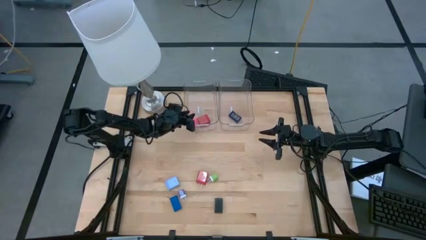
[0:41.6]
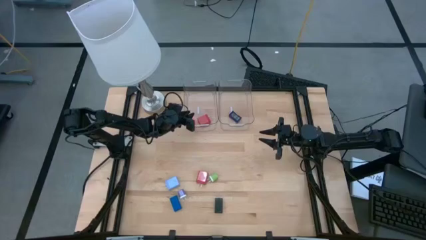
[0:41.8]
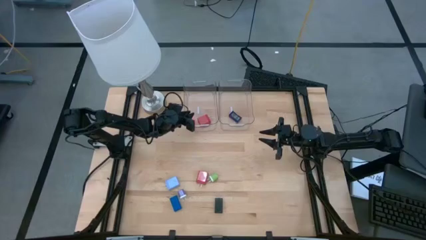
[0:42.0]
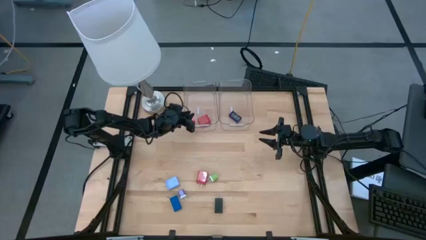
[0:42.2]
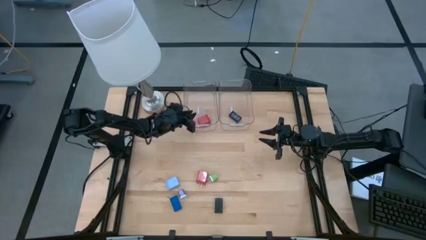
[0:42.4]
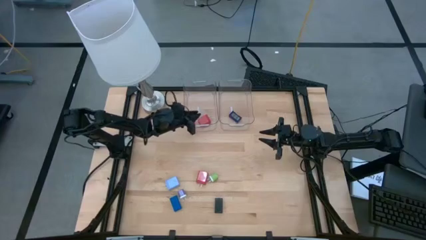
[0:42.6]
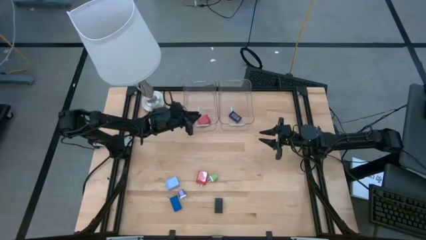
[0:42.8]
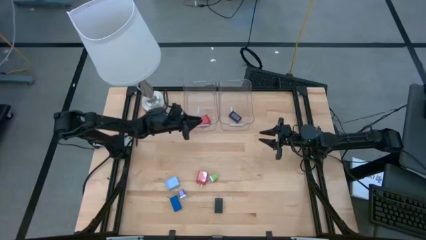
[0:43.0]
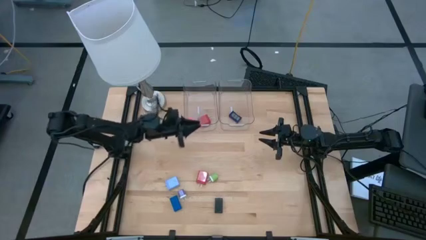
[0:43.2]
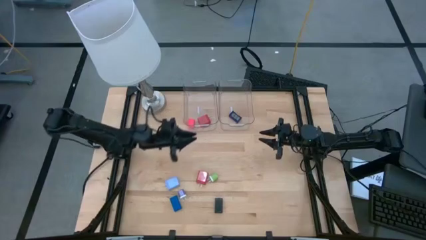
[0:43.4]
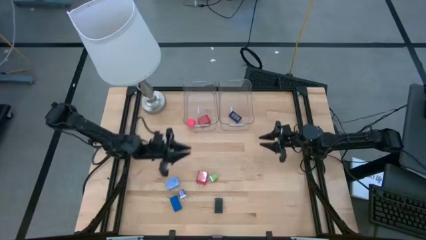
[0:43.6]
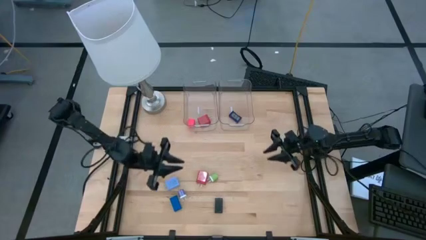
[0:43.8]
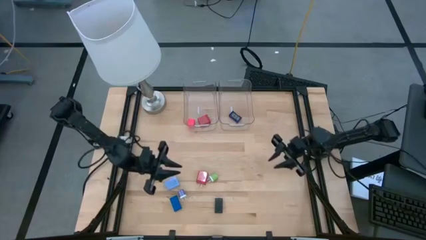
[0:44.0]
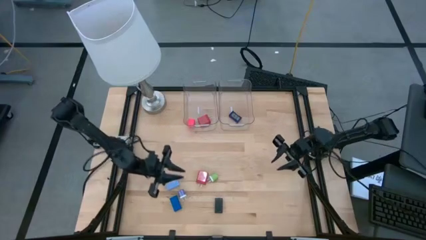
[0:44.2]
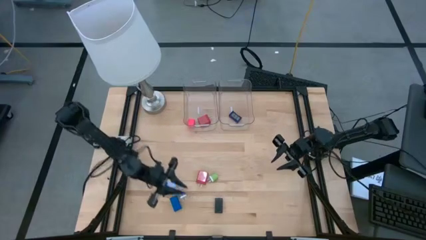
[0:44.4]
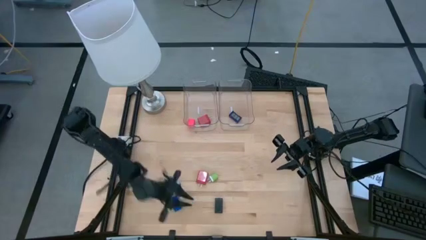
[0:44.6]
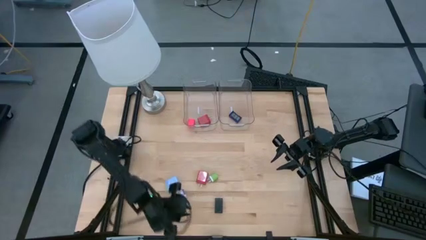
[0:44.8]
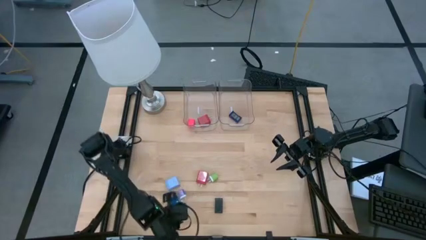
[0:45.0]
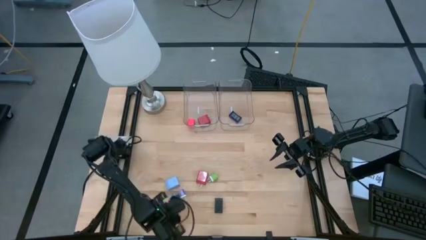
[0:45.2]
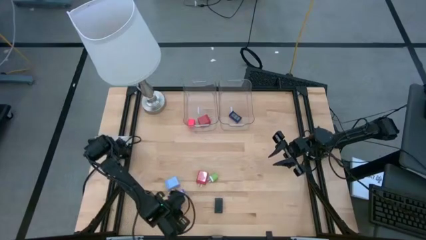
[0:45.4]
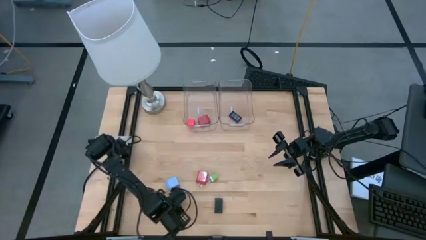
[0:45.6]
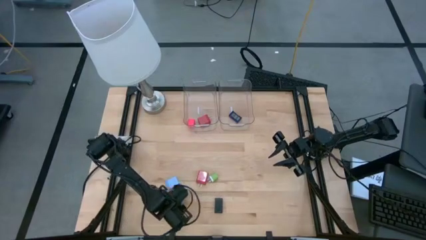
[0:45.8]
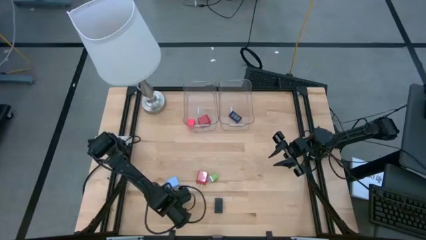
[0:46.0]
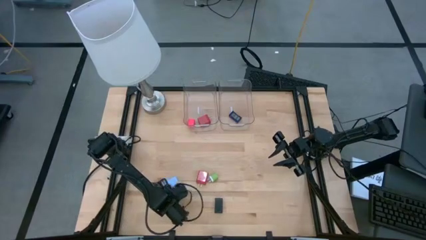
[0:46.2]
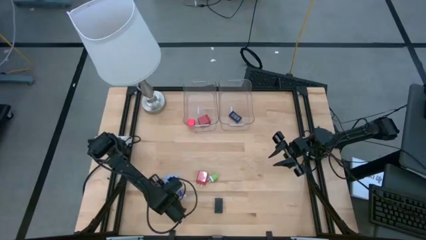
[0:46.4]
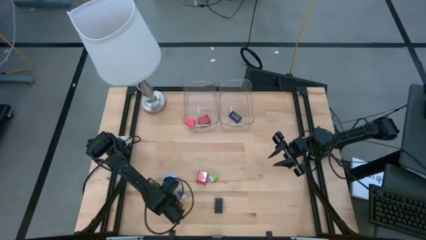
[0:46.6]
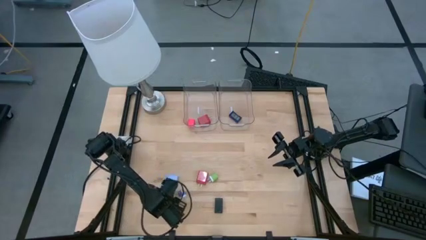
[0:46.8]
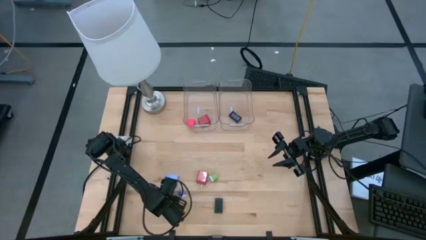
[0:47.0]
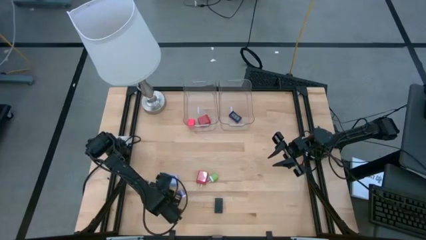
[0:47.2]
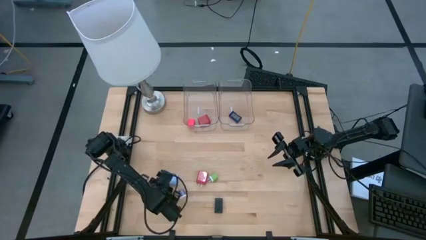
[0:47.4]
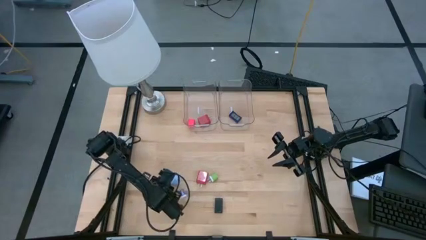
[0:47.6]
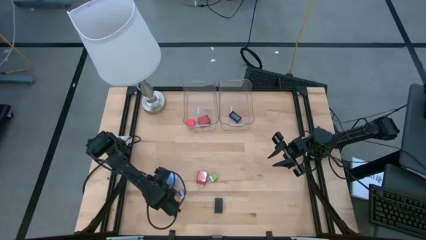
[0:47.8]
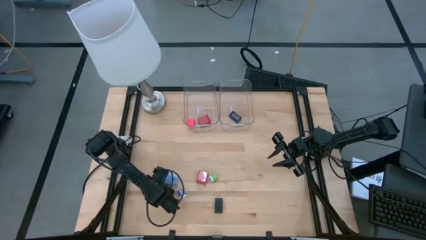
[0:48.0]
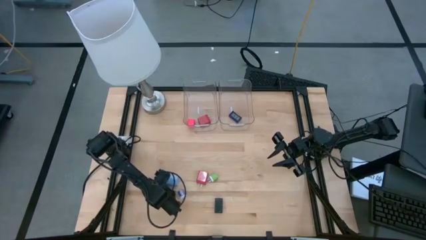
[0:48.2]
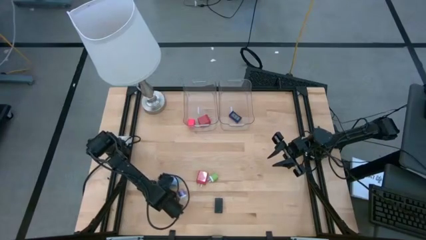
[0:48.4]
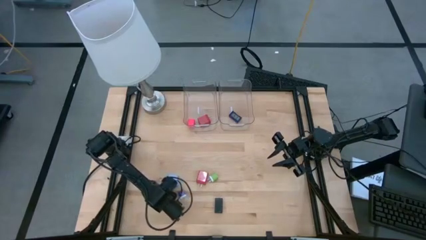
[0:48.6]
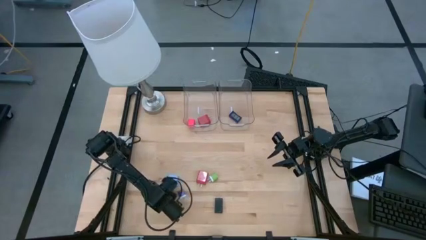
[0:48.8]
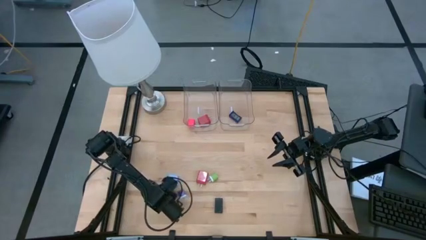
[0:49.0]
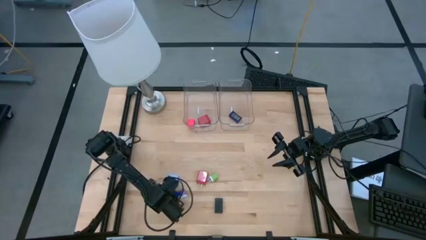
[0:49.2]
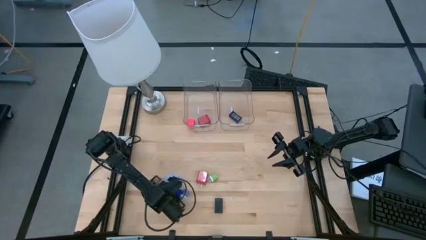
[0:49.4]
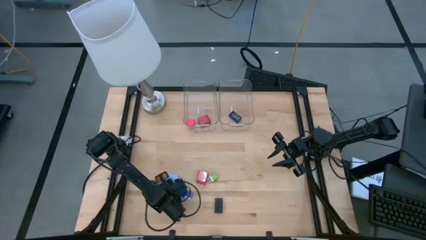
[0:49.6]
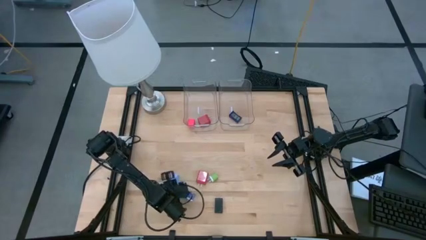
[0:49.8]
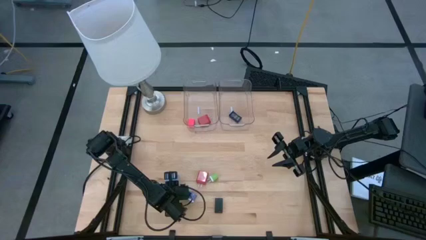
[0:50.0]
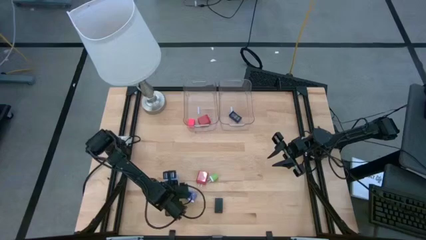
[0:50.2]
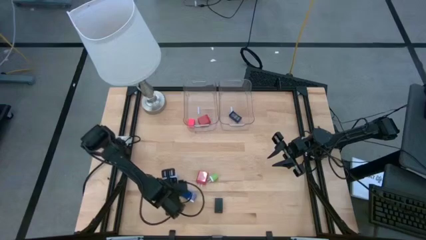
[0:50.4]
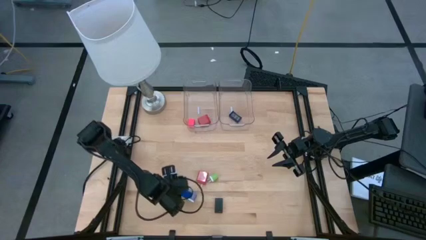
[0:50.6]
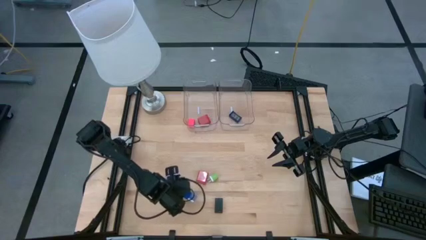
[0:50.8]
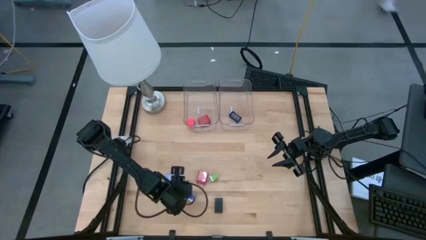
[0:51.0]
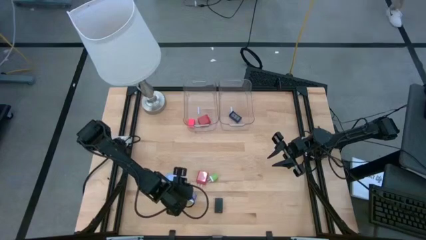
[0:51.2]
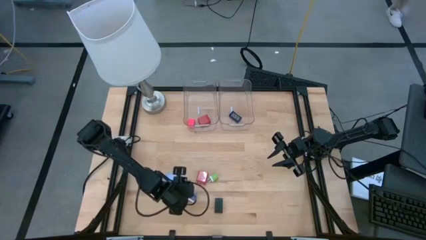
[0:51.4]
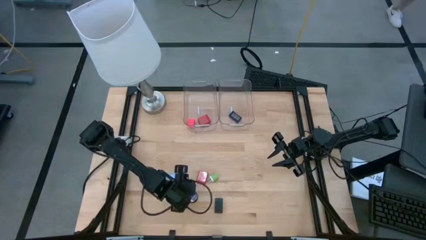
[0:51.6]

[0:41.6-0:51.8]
Task: Pick & Place Office items
Put the blue timer into the right transparent bin
